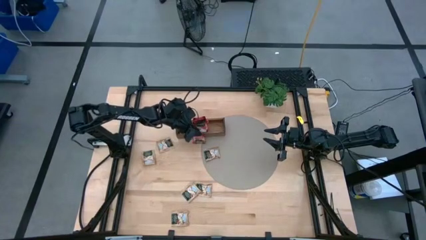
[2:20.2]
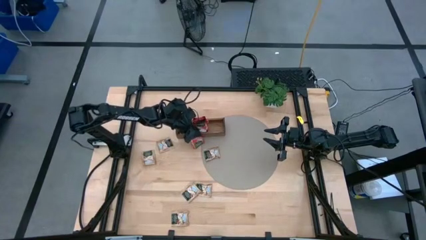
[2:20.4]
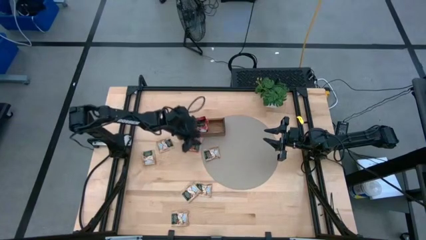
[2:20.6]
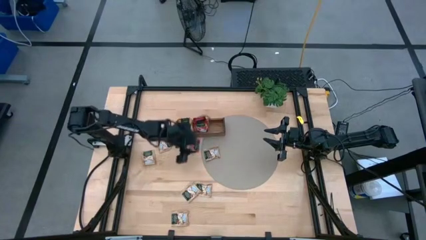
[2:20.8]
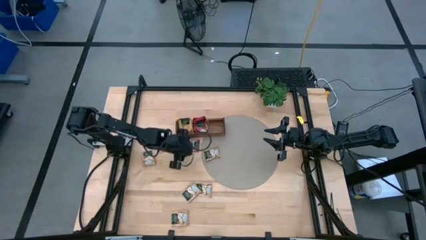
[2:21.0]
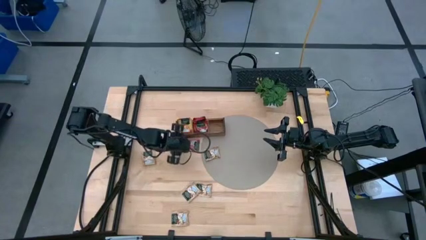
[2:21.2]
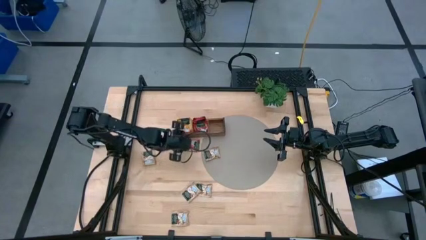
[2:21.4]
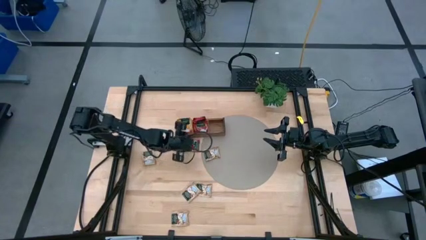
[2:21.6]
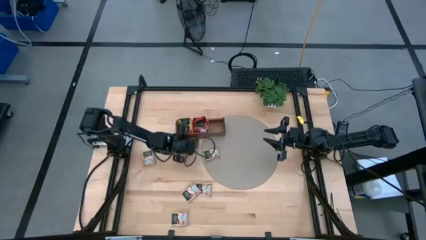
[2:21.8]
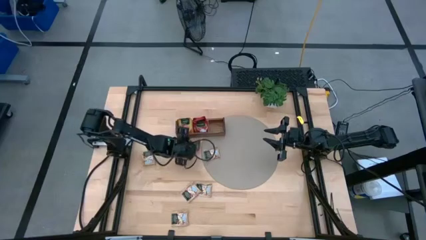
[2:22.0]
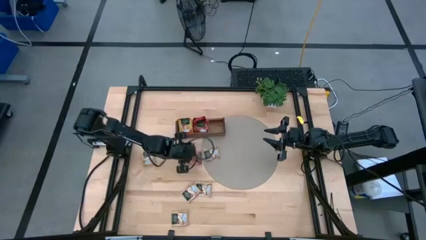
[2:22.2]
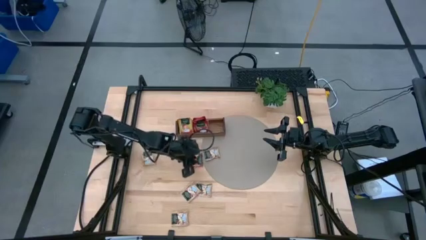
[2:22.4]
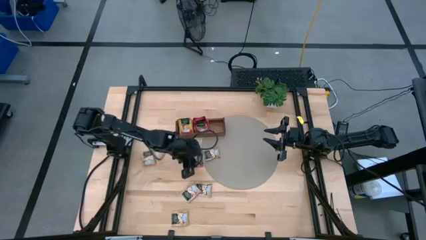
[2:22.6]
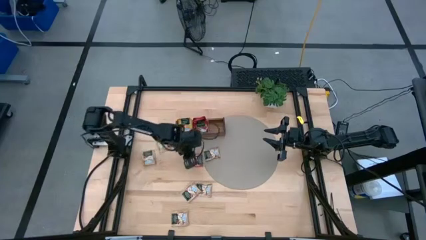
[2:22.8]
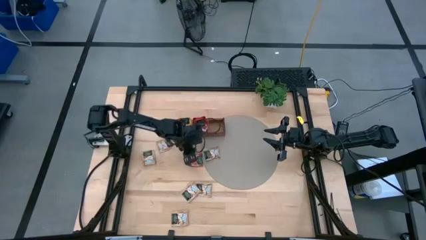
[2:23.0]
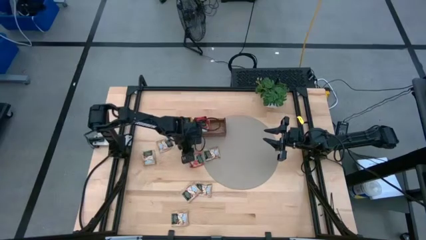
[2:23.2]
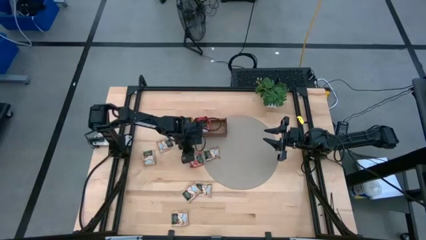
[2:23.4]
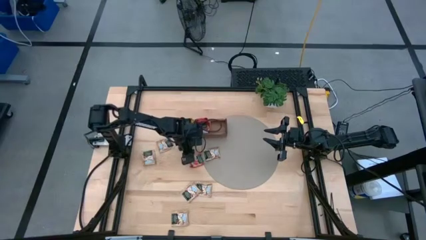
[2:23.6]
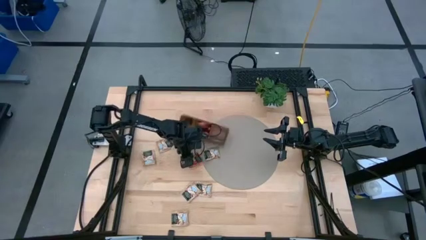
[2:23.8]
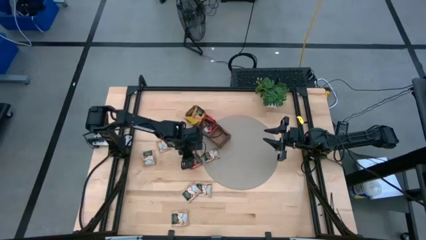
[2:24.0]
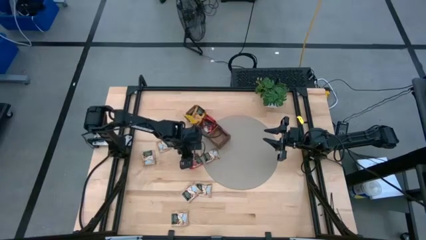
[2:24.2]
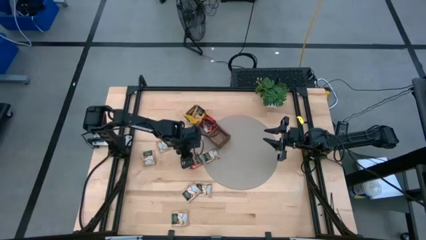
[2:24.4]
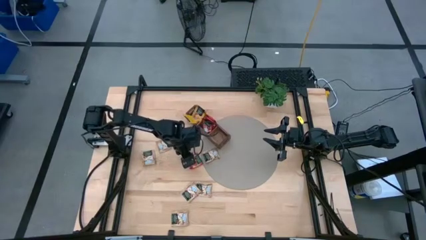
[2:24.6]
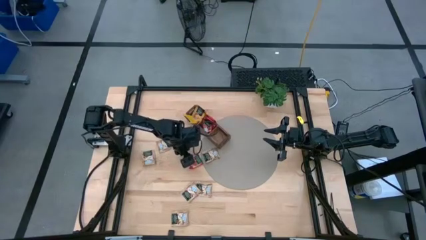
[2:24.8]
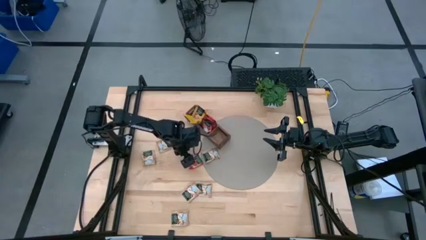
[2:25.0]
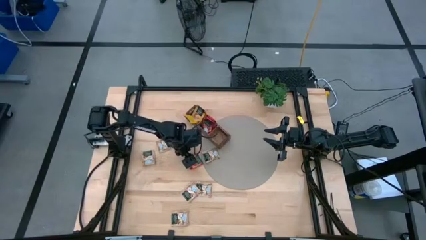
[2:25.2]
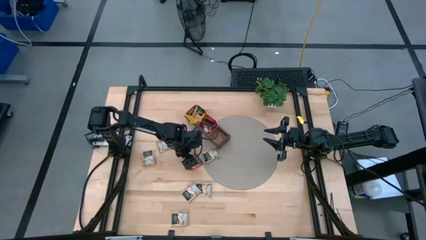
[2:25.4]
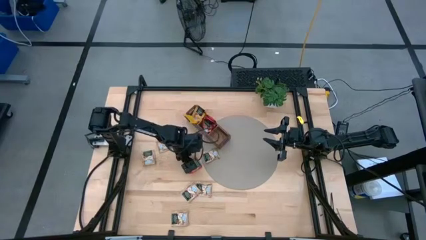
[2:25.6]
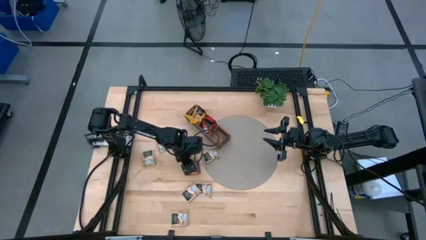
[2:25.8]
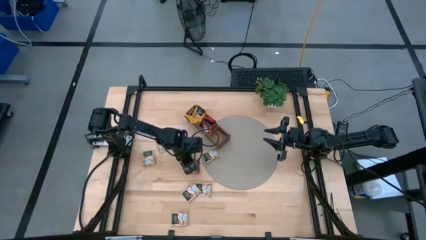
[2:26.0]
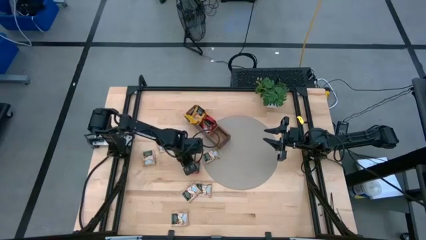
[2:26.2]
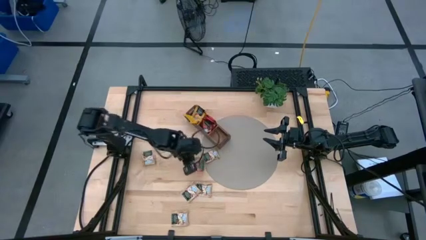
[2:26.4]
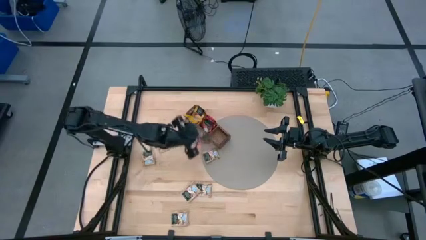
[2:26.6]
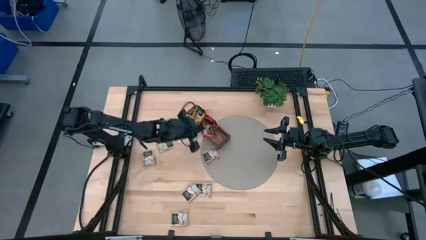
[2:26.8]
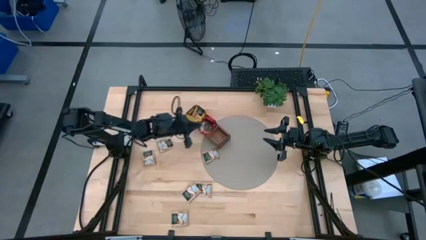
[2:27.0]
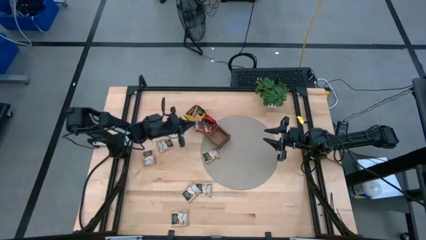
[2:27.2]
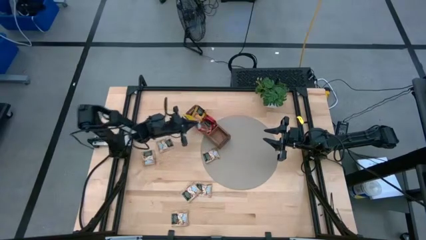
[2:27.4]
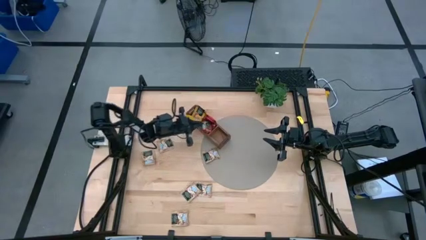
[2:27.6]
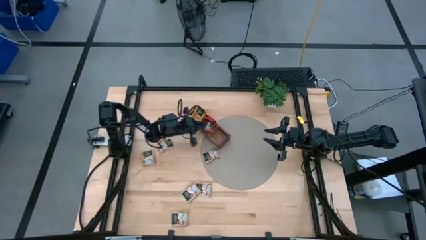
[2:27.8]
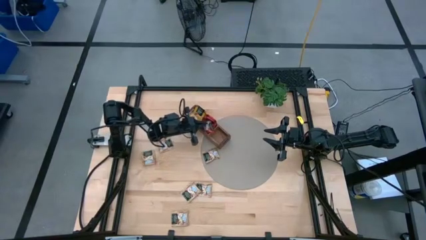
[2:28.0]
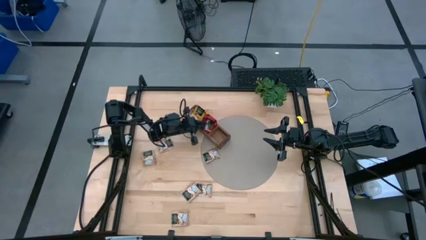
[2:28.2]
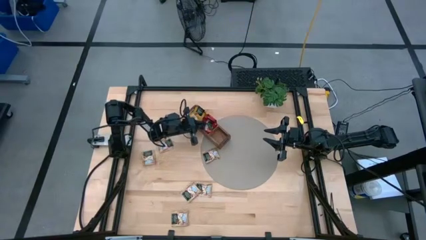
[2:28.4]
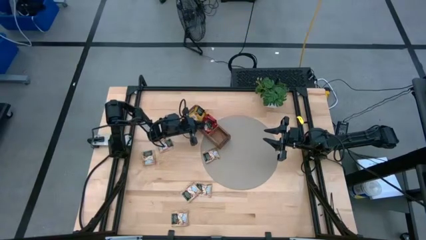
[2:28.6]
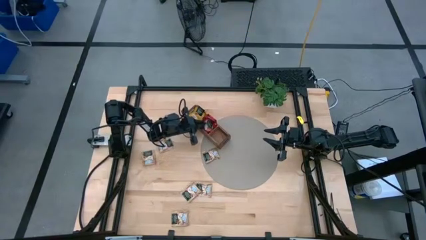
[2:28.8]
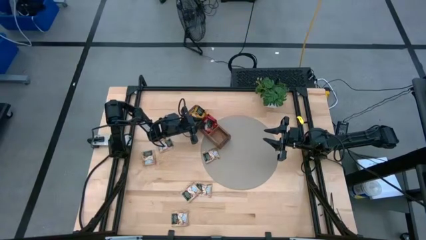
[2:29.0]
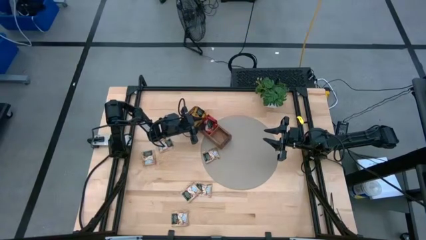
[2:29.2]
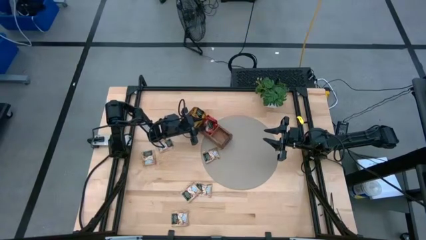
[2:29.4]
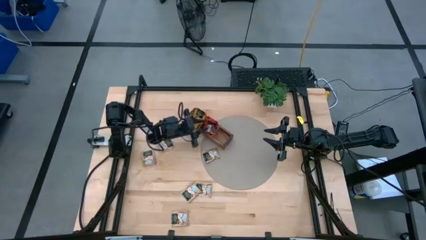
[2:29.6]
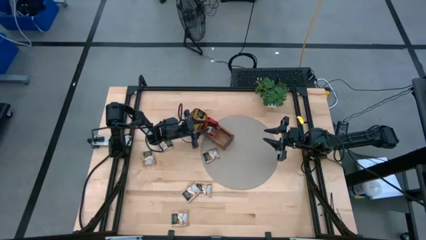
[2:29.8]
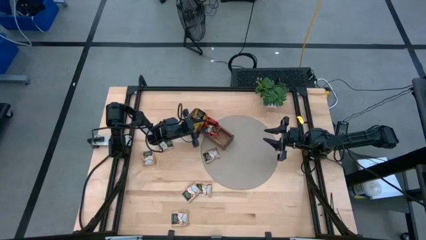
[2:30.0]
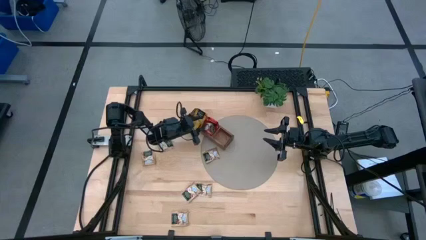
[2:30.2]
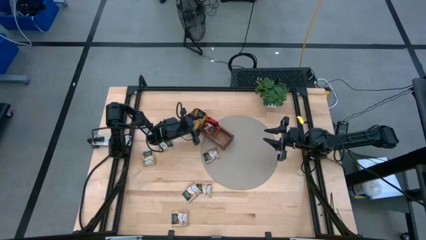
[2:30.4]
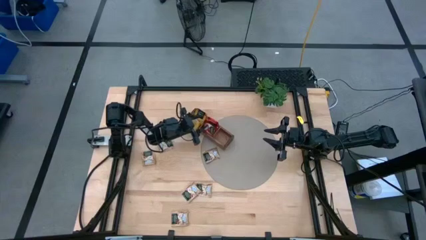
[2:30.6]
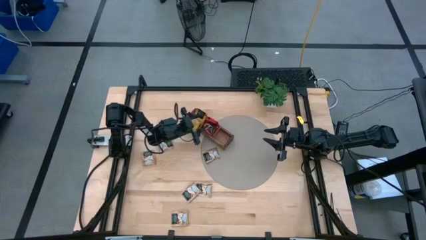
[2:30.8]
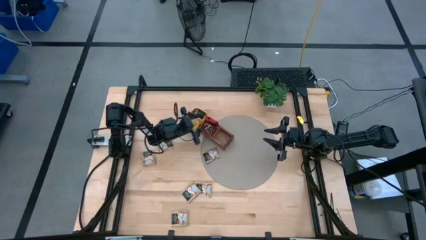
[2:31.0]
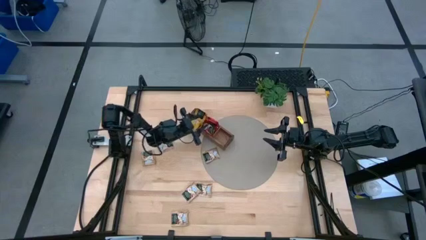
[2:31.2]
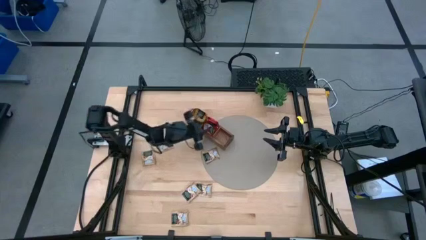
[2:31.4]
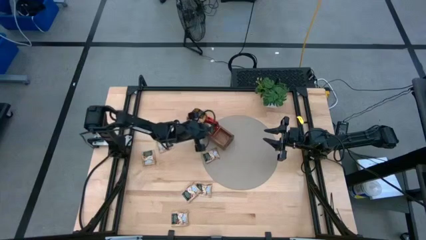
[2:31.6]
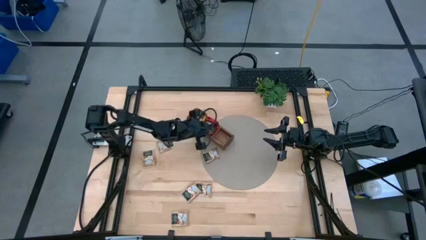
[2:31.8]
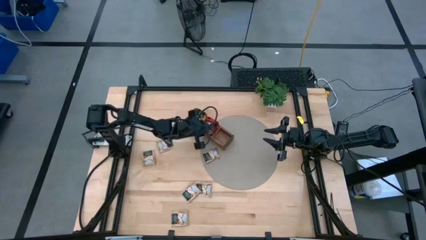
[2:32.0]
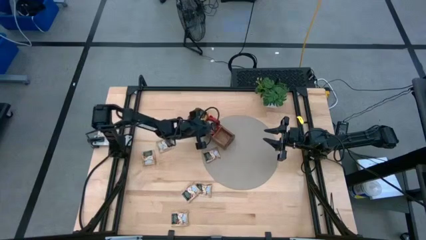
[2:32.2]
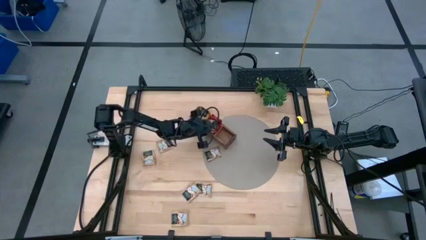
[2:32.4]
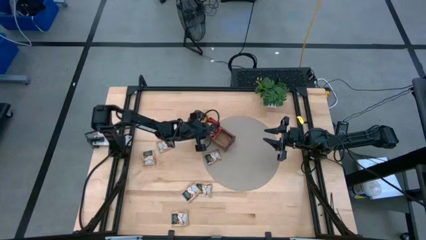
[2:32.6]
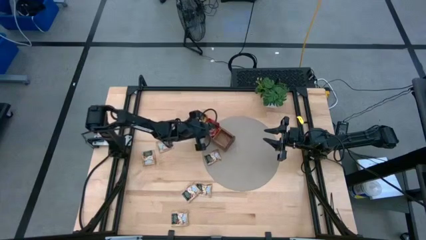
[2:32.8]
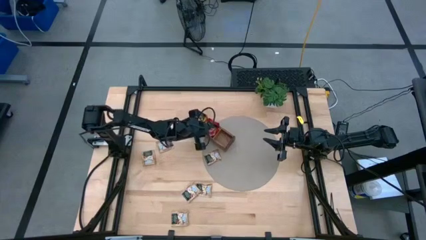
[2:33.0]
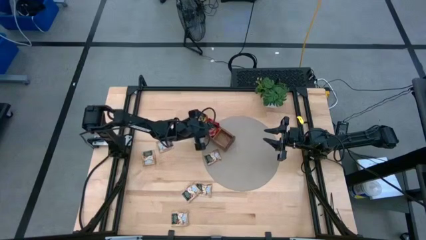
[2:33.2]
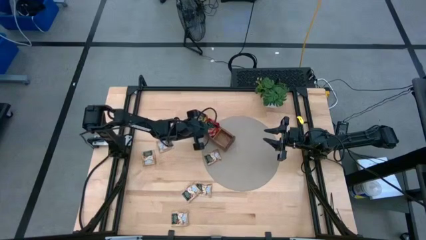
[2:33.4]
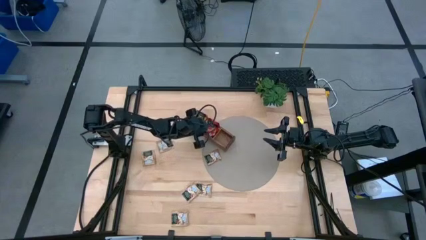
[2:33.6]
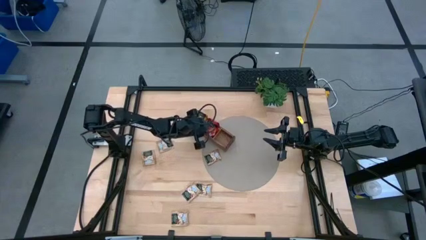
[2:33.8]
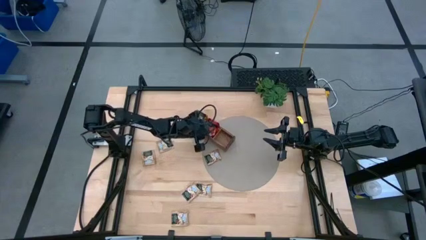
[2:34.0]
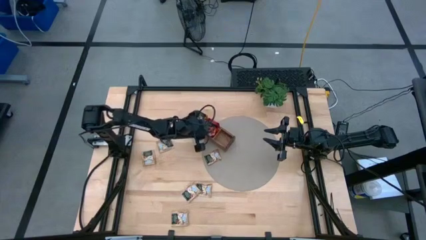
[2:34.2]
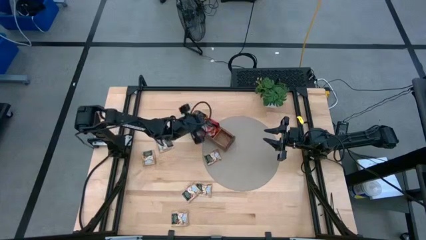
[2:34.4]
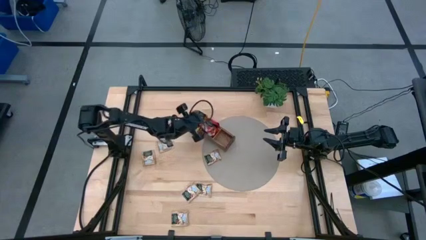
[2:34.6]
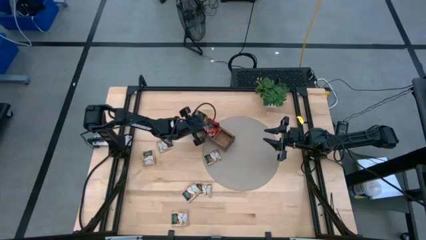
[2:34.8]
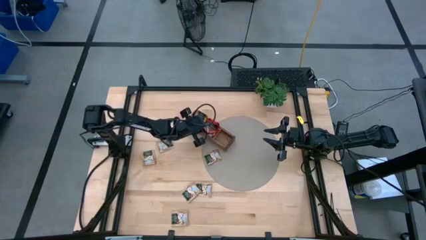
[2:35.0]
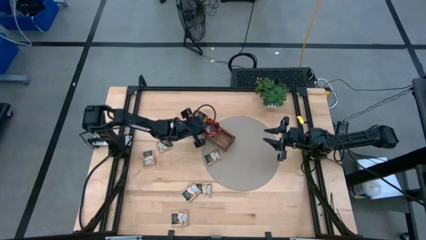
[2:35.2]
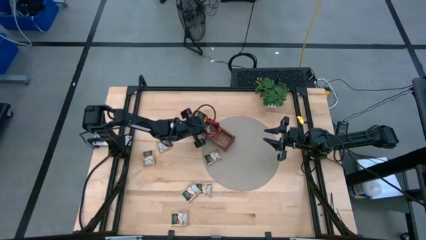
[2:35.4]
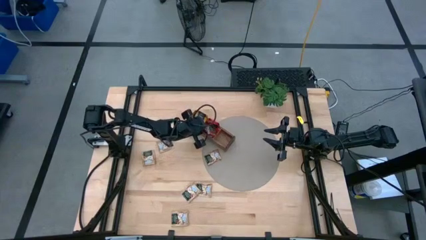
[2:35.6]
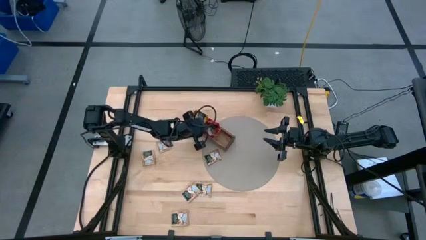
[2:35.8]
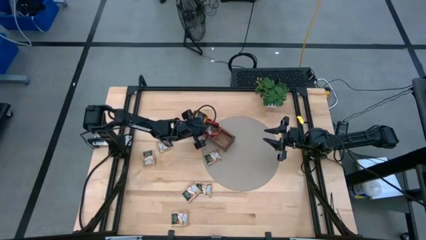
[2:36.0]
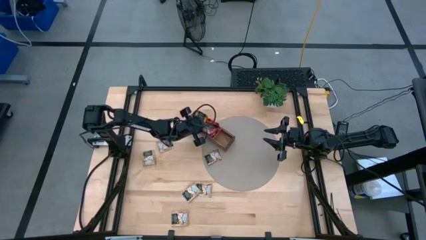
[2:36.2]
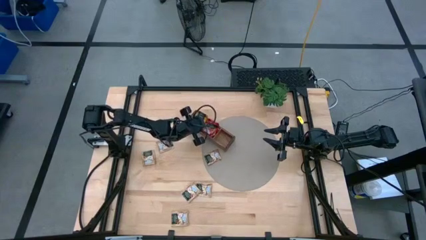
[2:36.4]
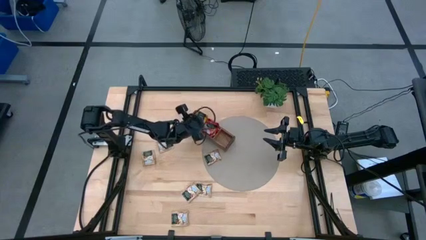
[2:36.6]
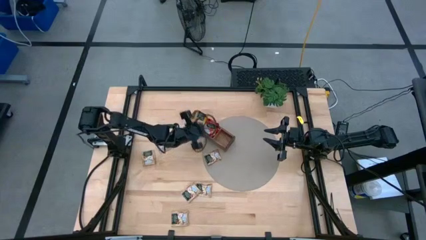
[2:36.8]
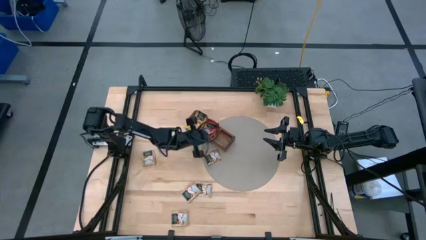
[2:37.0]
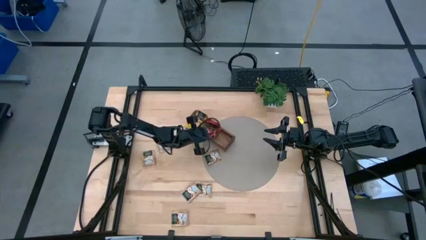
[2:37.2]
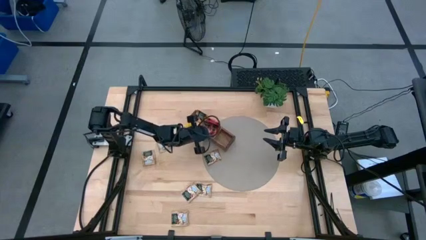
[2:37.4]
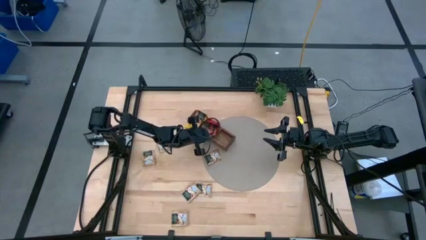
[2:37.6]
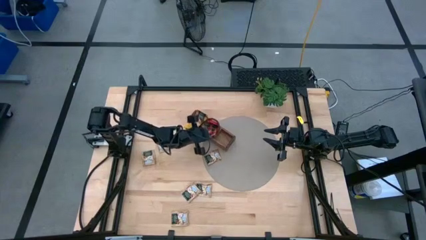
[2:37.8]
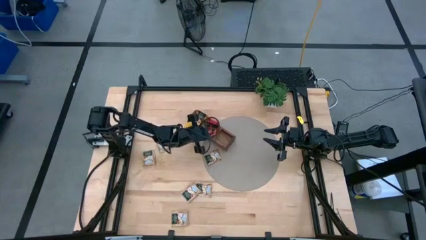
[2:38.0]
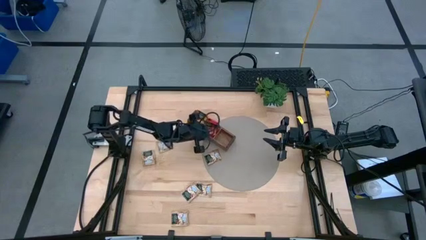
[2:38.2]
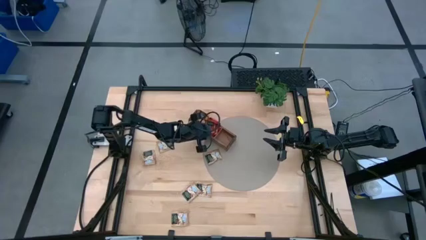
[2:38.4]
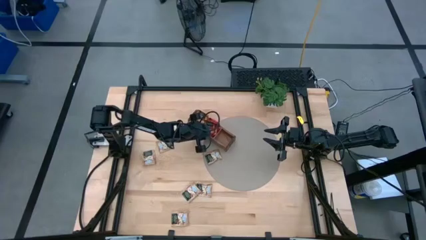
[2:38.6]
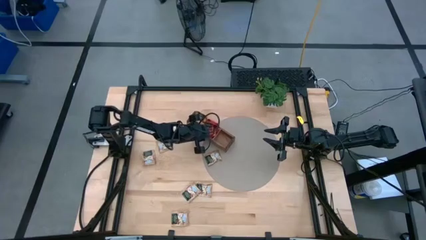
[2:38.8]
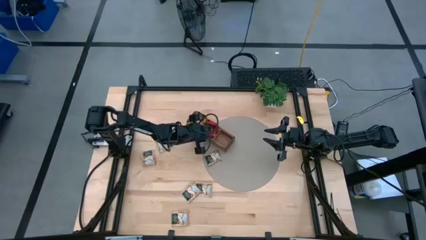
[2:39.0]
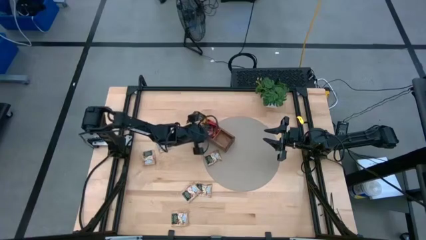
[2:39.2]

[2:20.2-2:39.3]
Task: Pick & Place Tea
Put the red tea bag into the middle section of the wooden organizer
